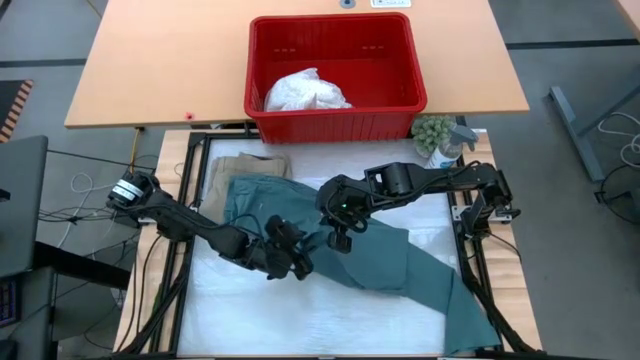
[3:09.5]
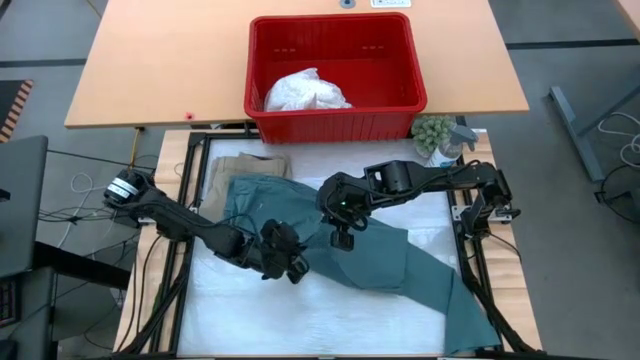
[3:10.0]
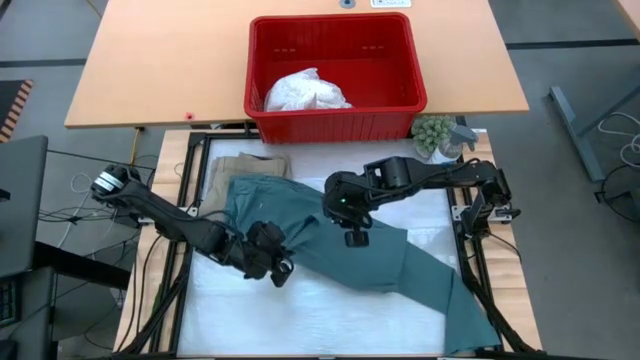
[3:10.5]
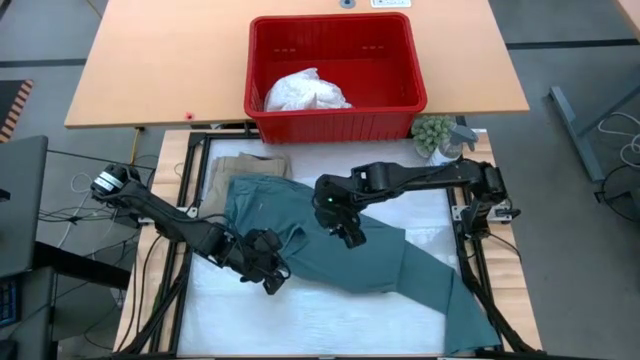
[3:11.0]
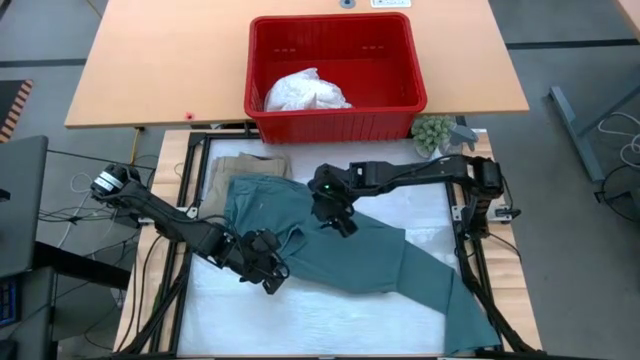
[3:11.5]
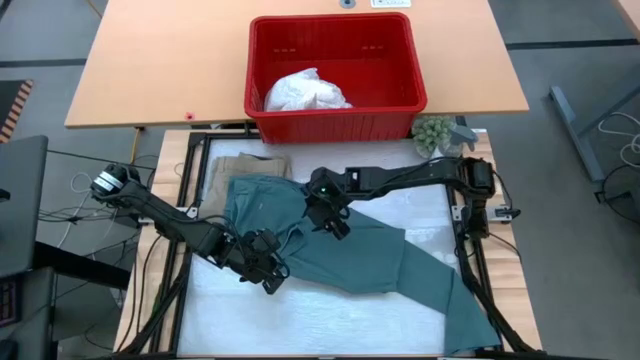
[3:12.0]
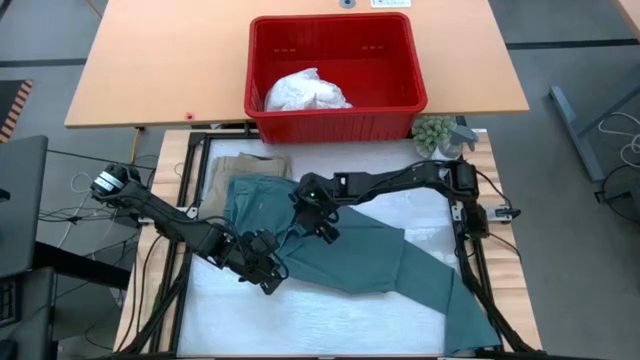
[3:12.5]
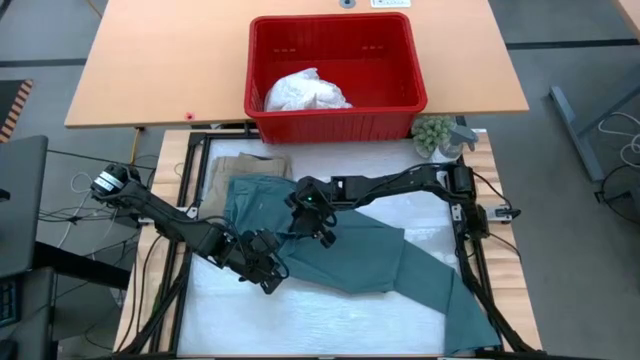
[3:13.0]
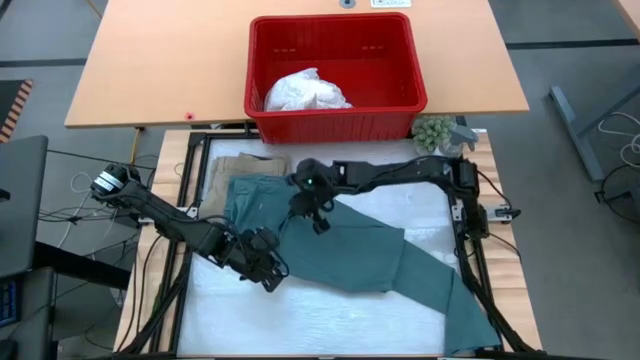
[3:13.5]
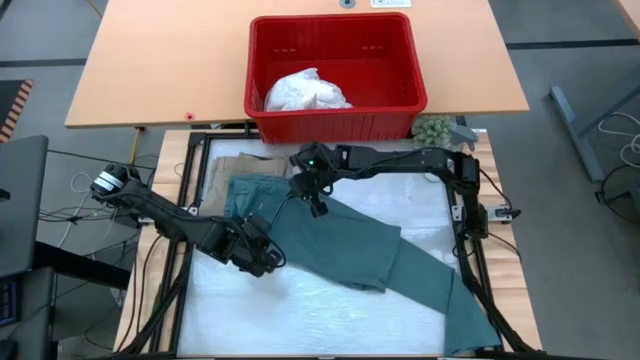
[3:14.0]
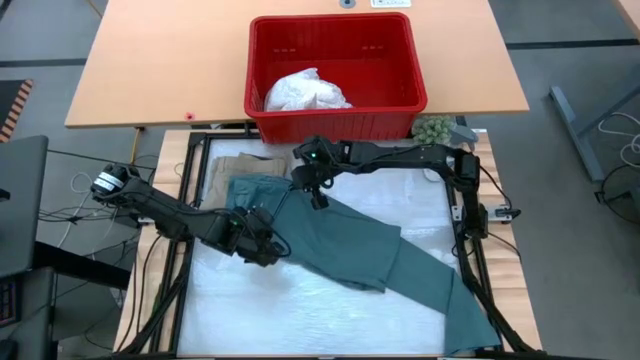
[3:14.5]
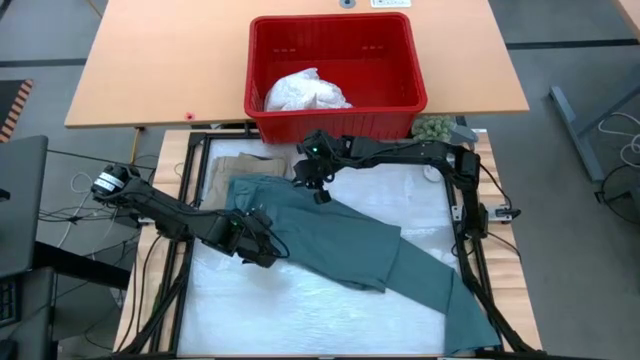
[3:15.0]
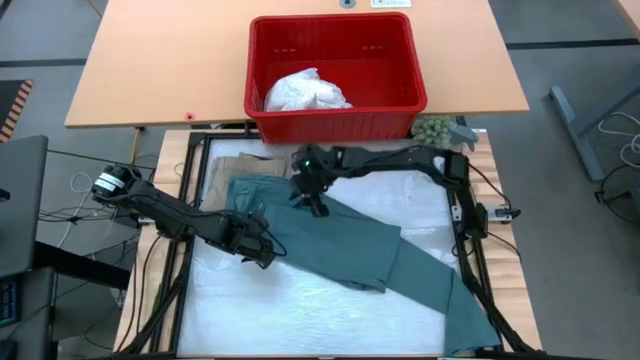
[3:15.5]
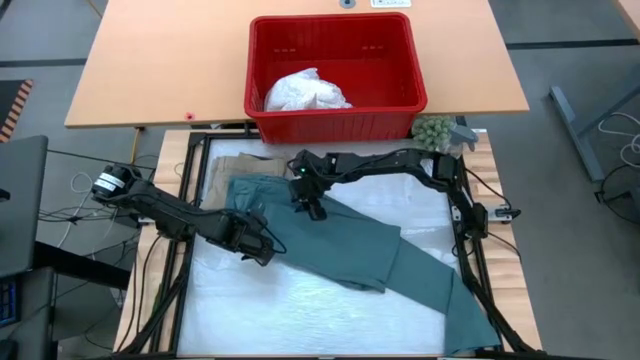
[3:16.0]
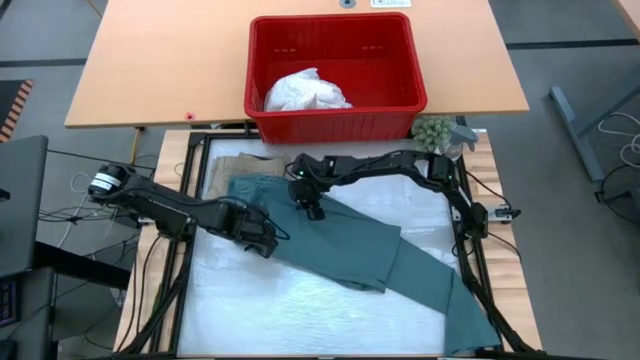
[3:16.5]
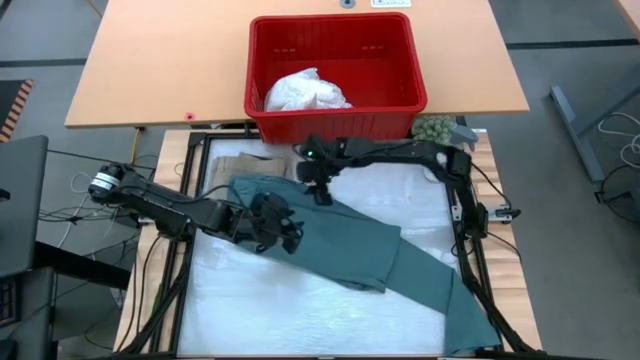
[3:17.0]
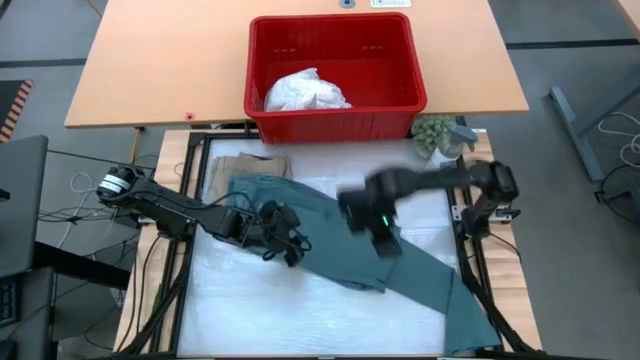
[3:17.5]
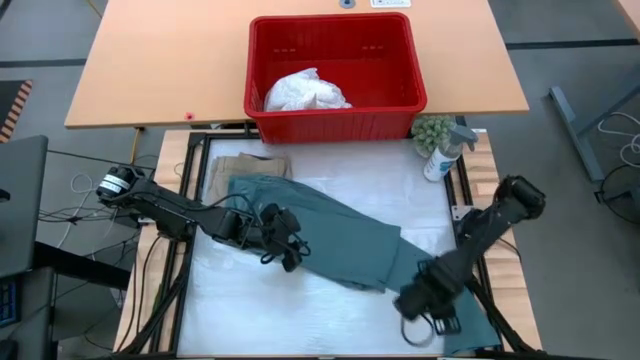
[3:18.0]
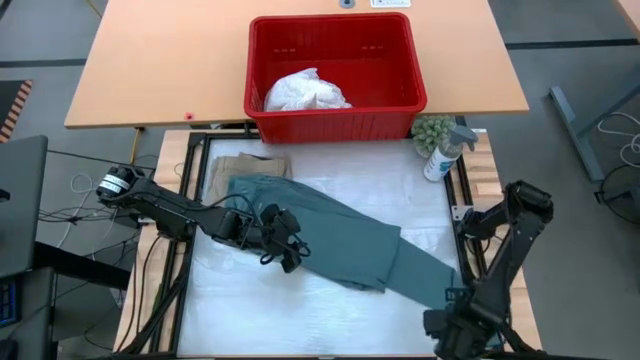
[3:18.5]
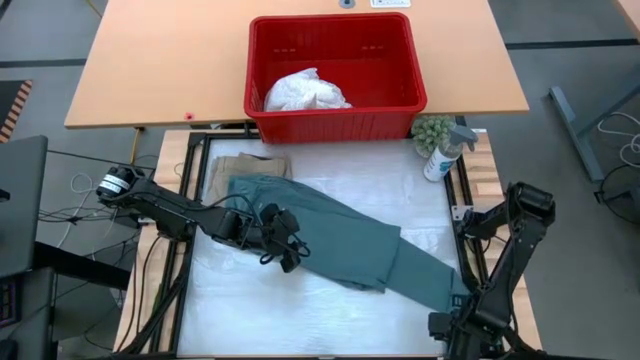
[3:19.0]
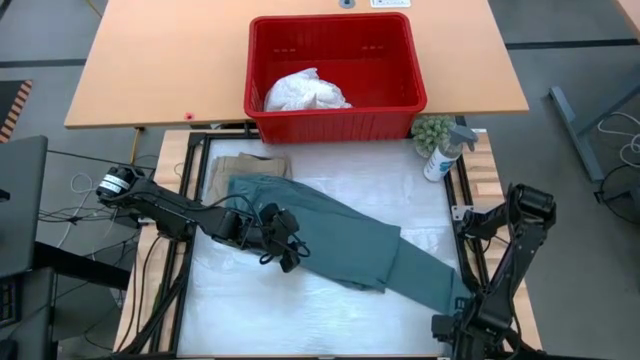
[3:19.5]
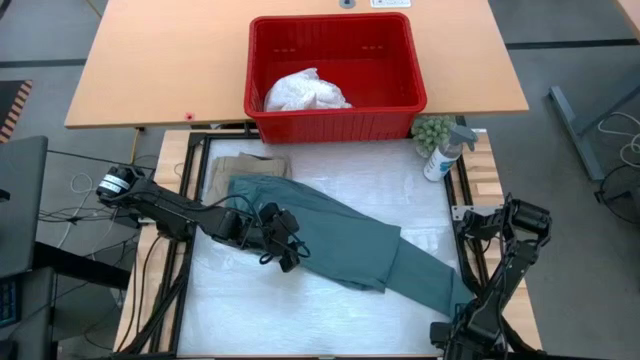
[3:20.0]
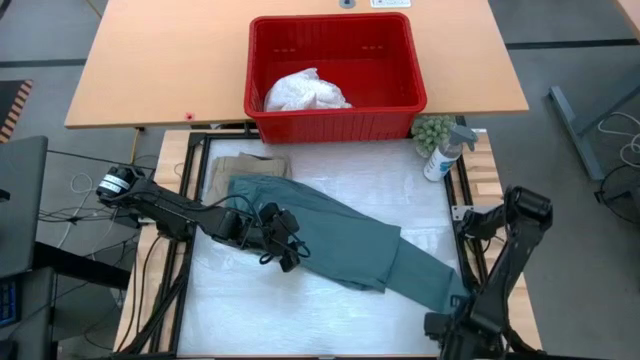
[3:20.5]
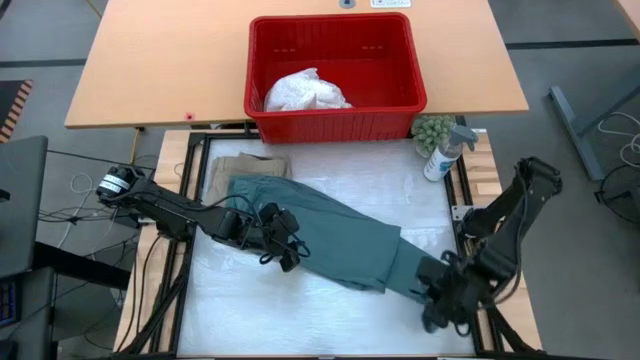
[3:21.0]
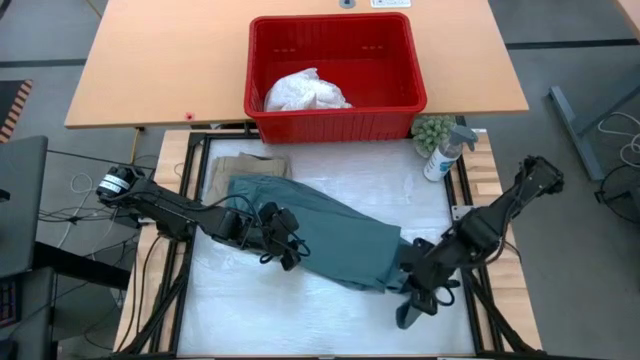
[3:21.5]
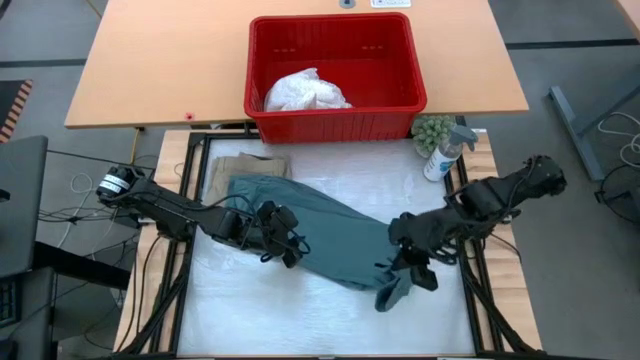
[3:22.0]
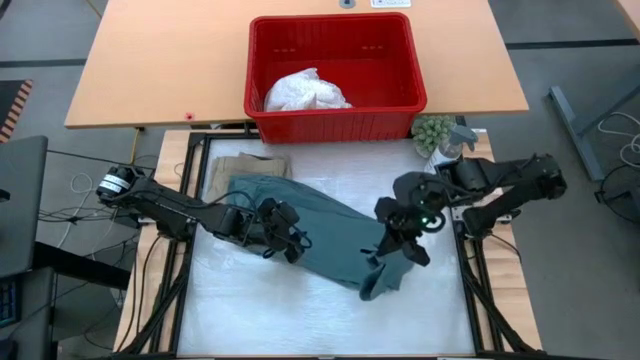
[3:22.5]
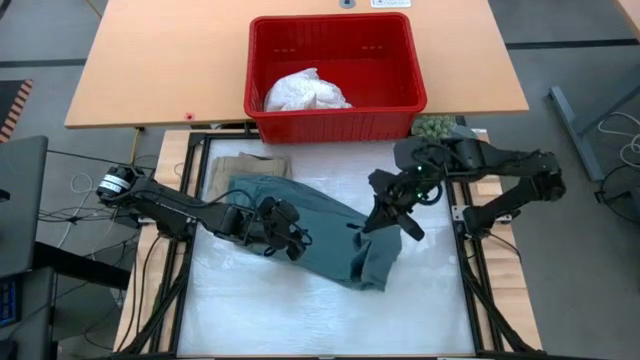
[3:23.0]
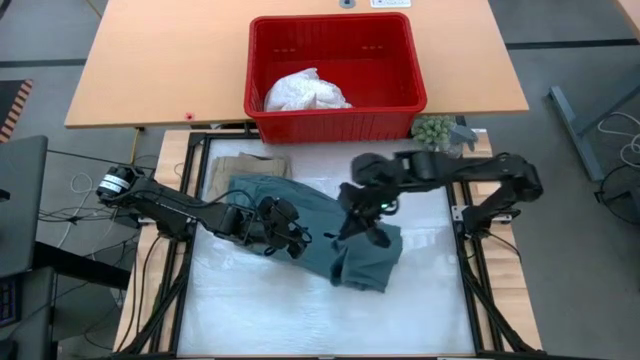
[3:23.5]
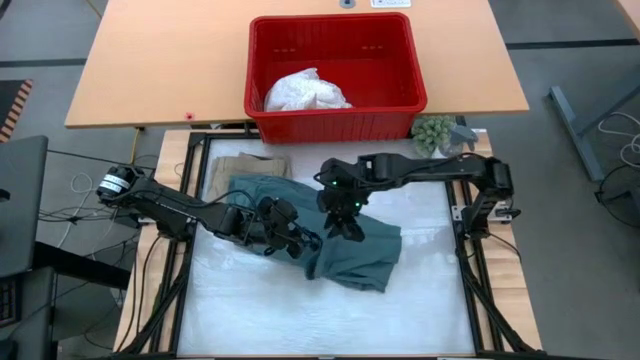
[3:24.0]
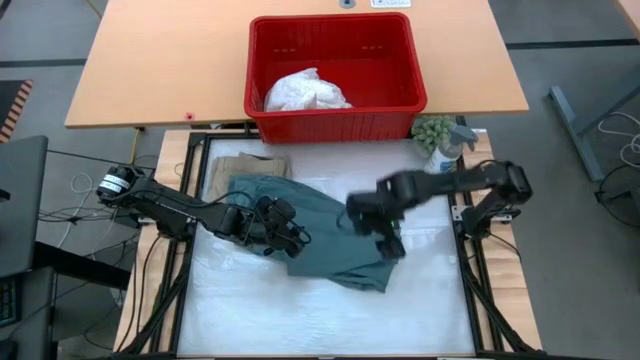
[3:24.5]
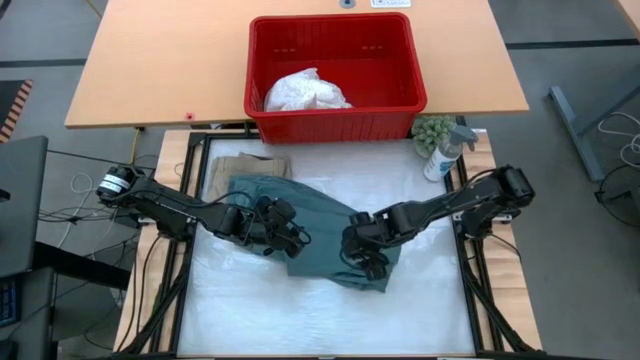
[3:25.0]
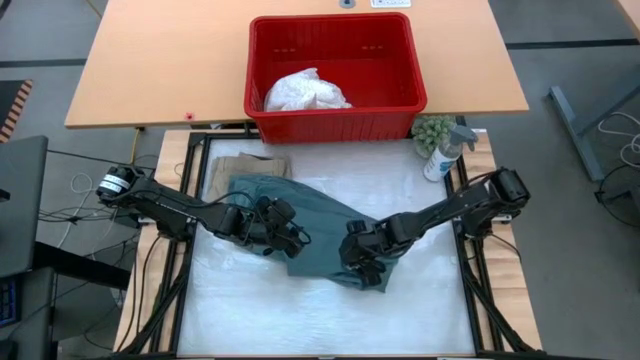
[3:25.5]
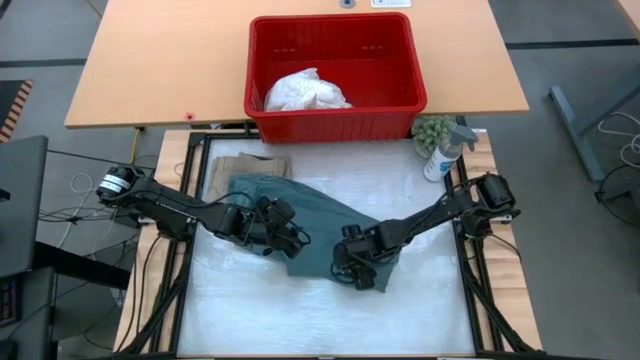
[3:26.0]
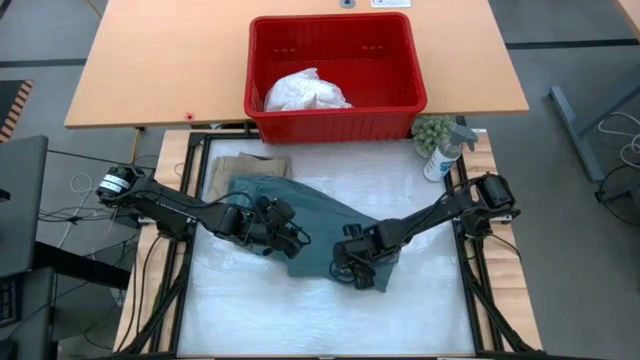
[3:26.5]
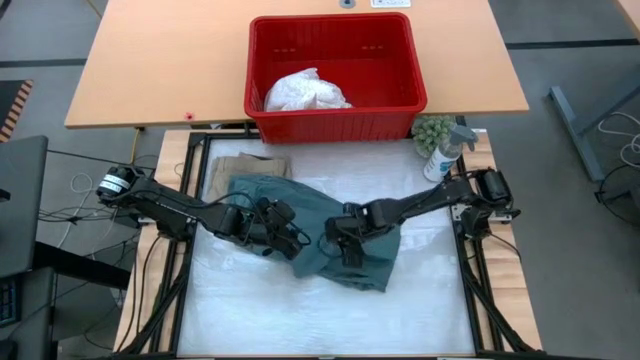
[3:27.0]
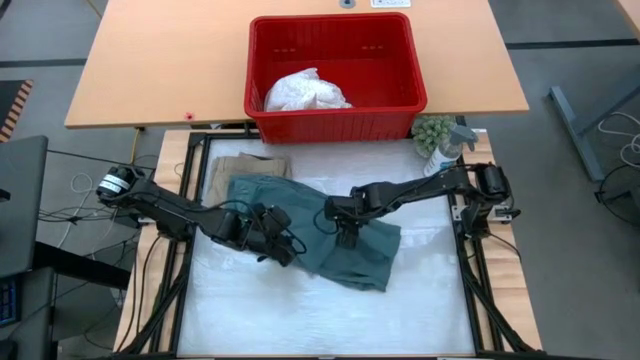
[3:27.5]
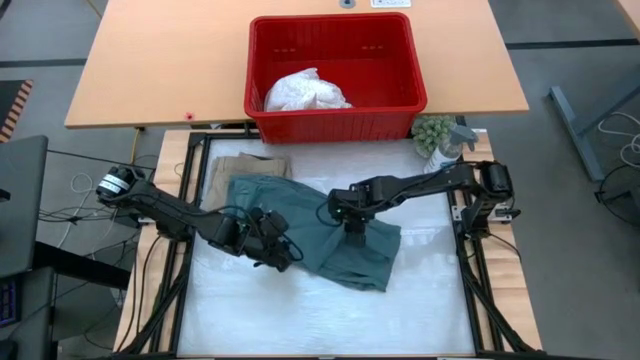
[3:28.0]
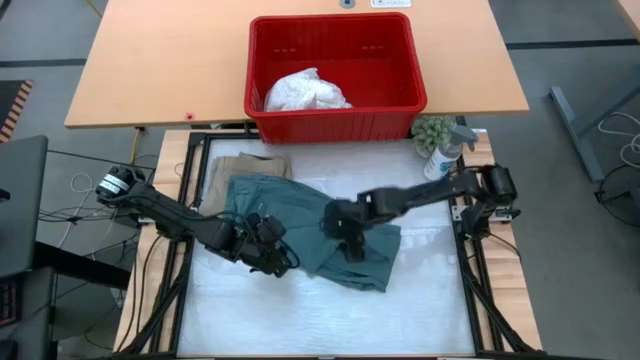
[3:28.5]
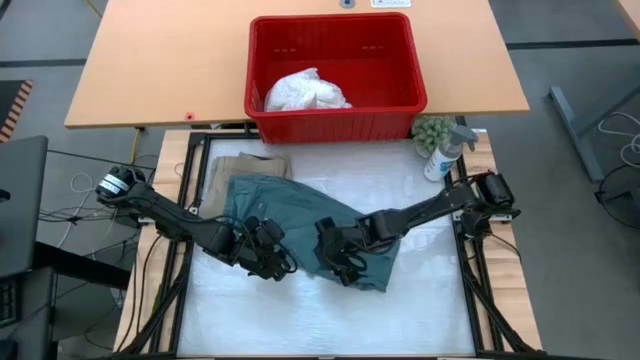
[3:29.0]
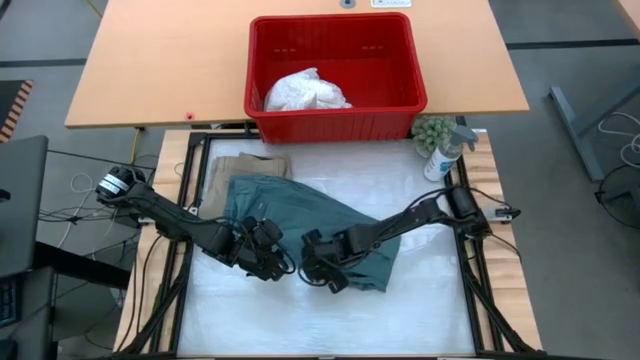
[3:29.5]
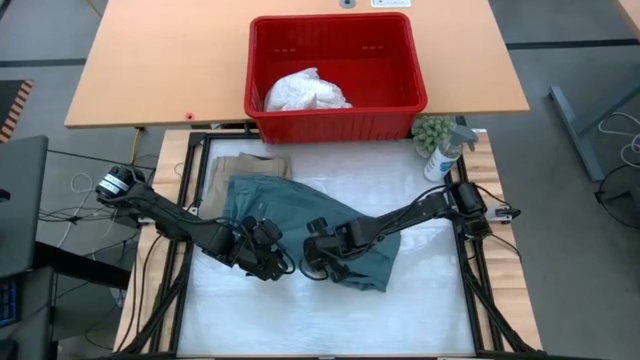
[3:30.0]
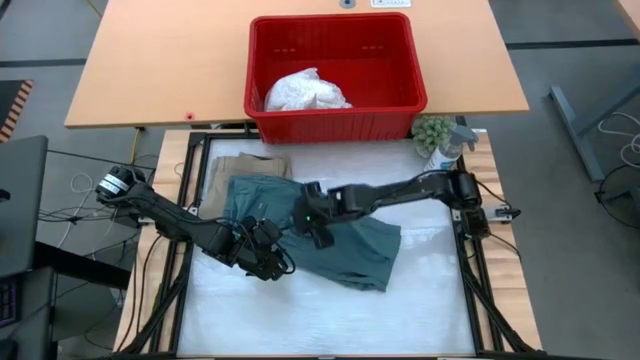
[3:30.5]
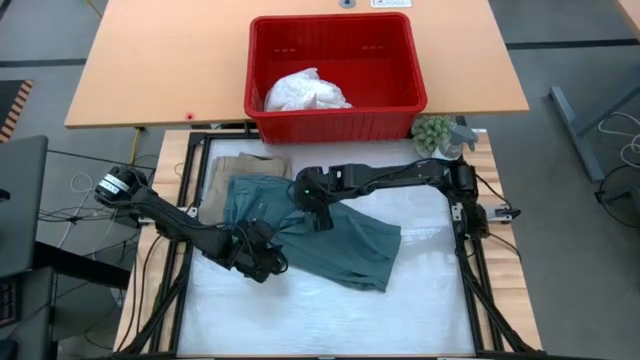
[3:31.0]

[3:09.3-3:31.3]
Task: Fold Laundry from Bin
Fold the blue pants in the red bin
